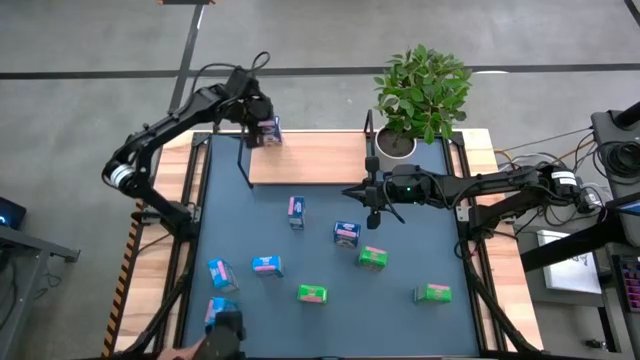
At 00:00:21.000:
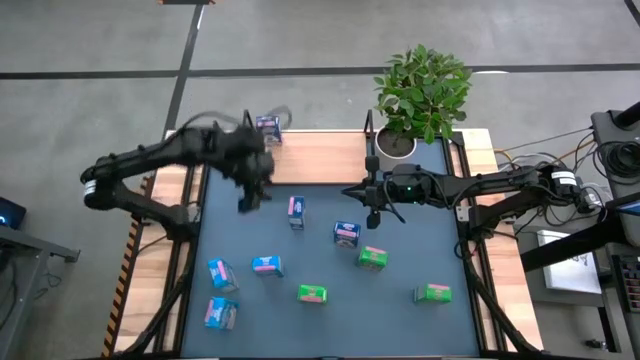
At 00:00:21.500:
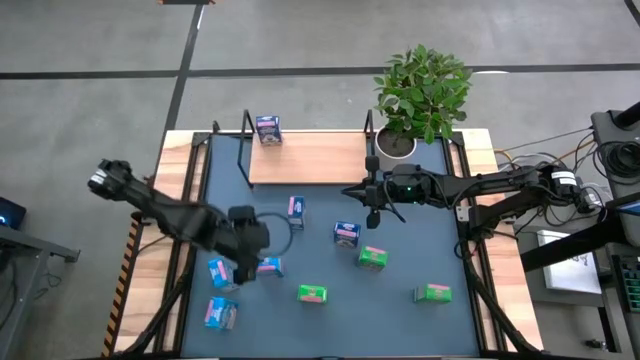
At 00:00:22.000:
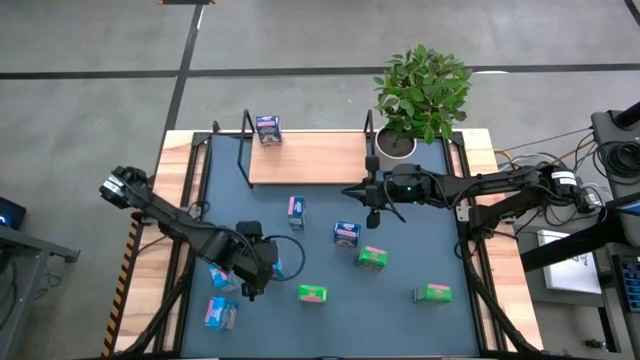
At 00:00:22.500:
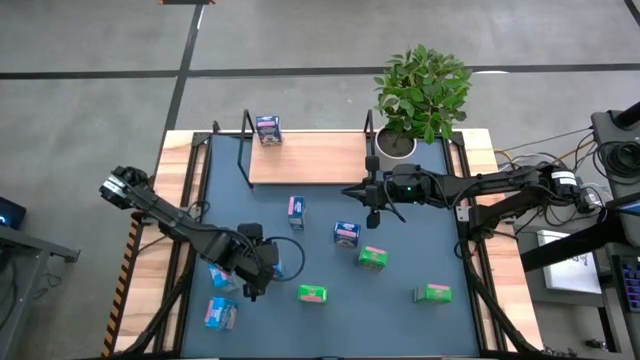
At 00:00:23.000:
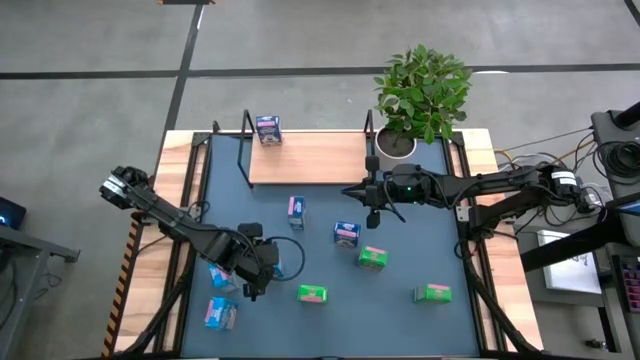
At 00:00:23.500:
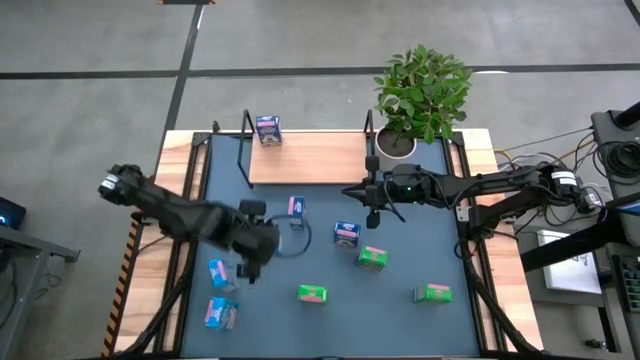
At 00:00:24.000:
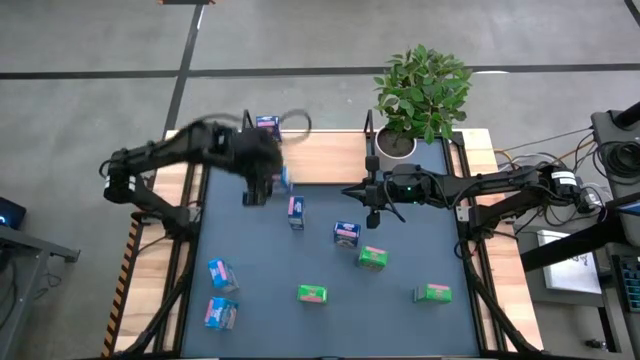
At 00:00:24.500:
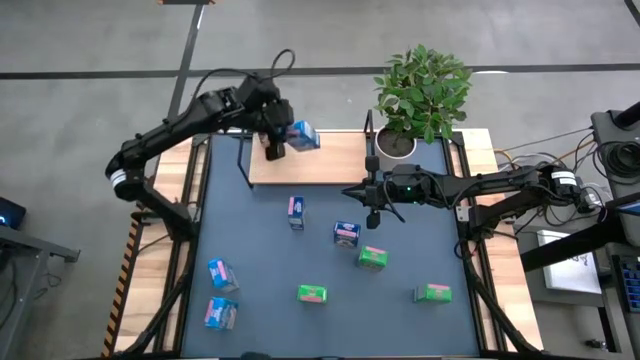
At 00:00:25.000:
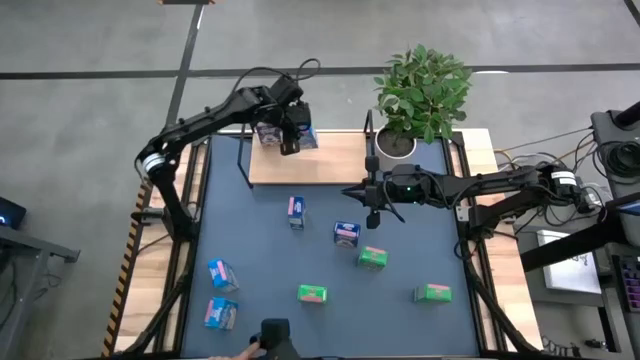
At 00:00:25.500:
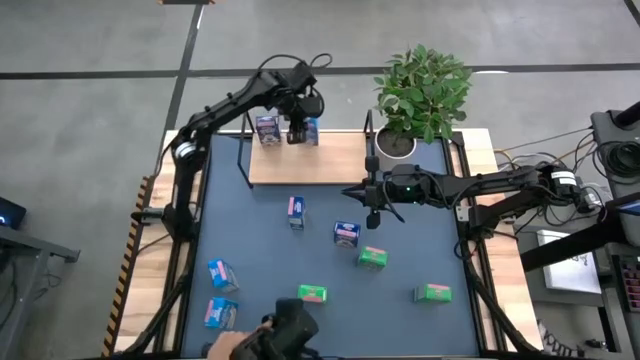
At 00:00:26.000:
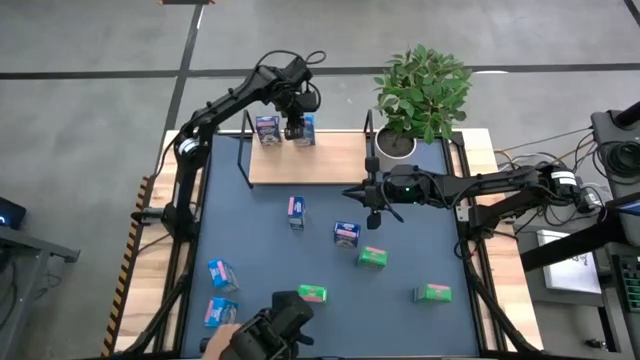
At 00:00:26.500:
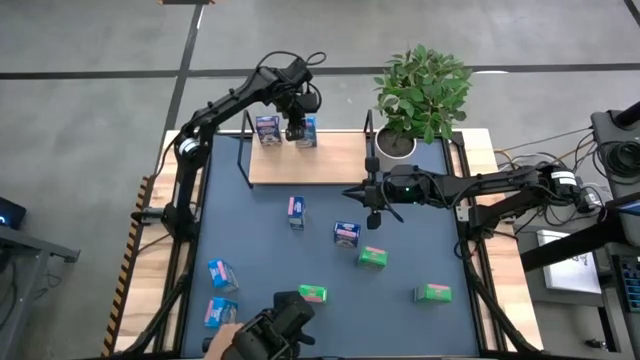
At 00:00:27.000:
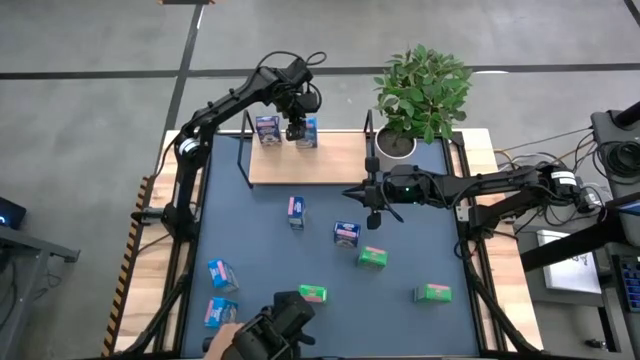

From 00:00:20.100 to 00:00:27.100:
Task: Stack cereal on shelf
Put the top right light blue cereal box on the shelf

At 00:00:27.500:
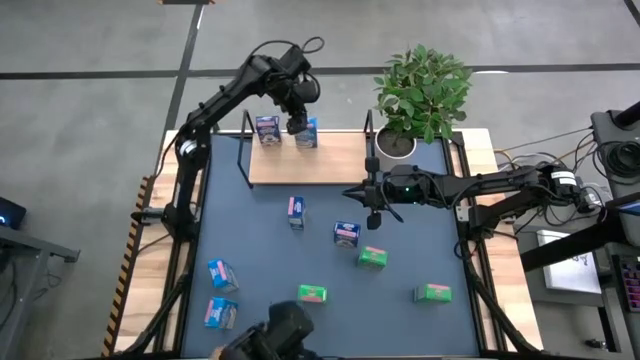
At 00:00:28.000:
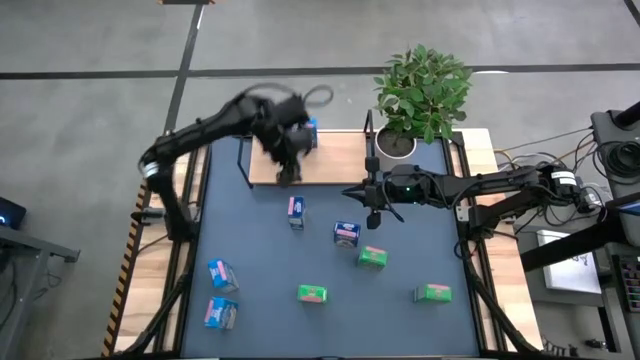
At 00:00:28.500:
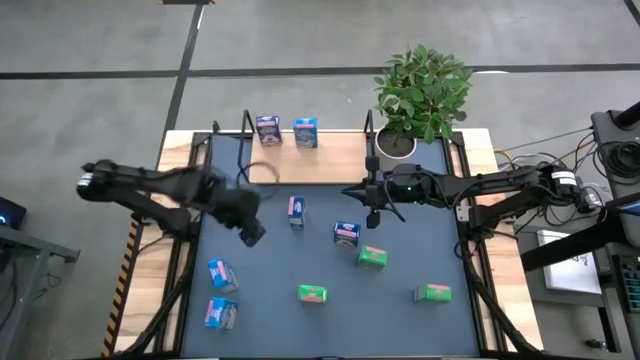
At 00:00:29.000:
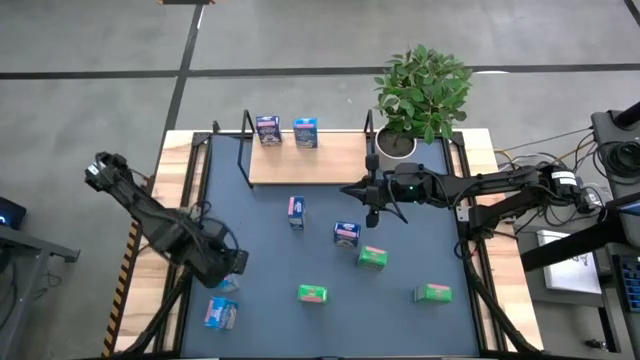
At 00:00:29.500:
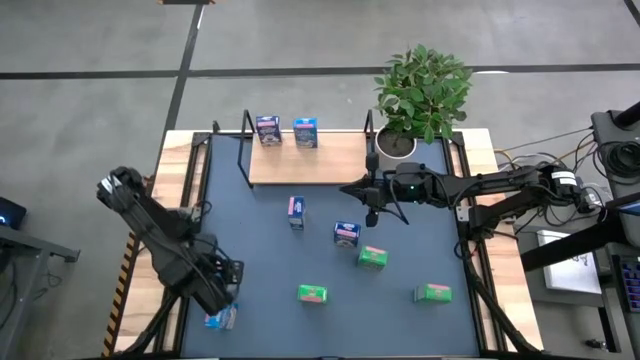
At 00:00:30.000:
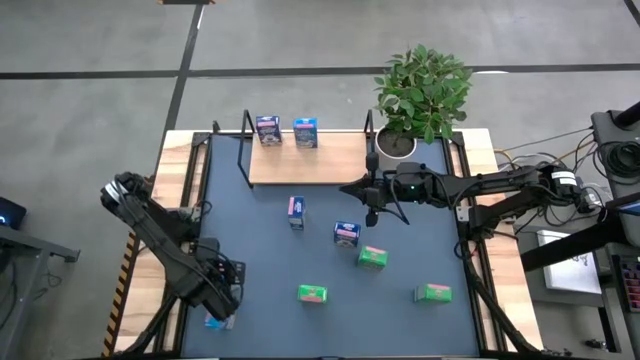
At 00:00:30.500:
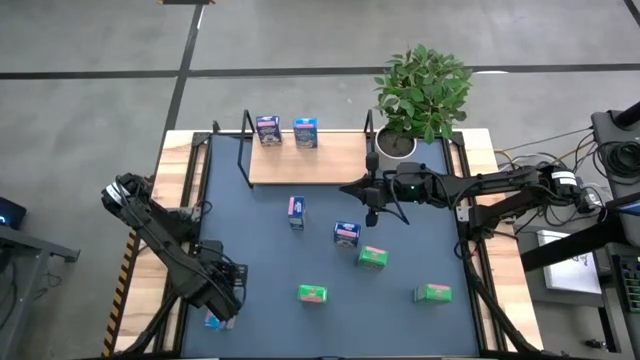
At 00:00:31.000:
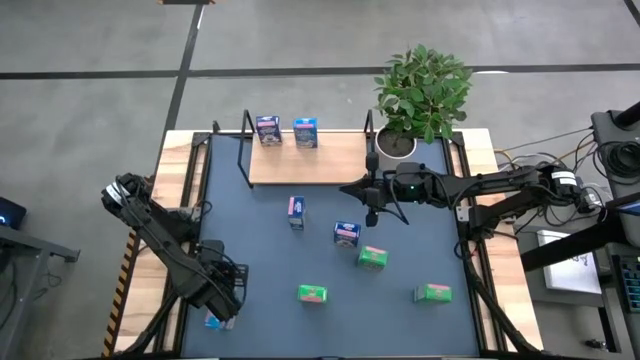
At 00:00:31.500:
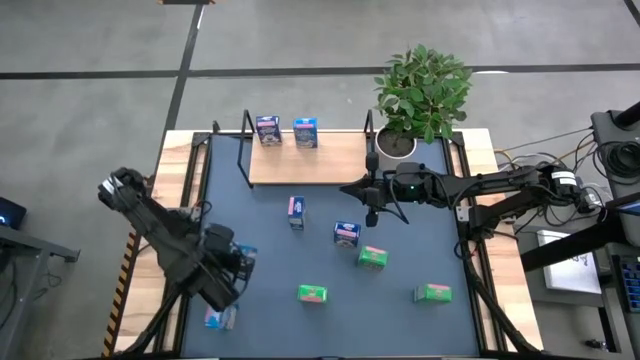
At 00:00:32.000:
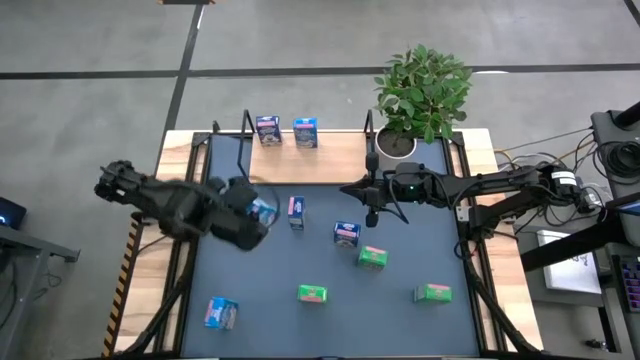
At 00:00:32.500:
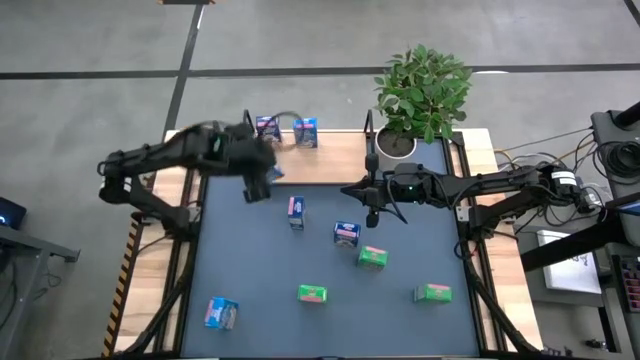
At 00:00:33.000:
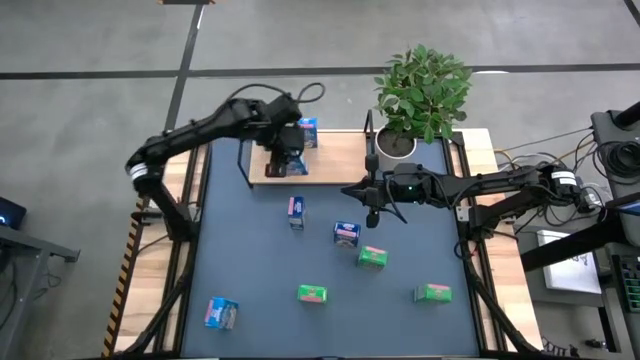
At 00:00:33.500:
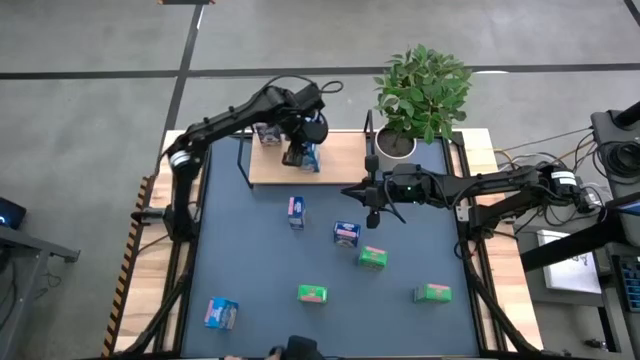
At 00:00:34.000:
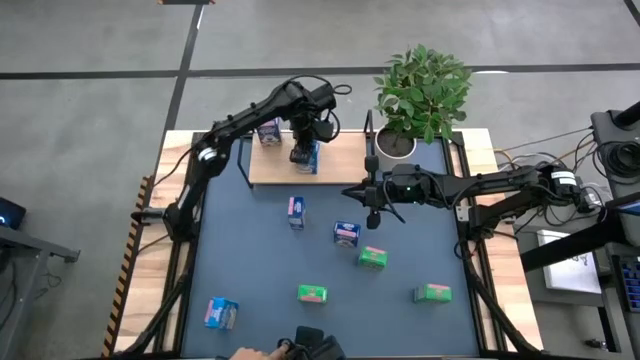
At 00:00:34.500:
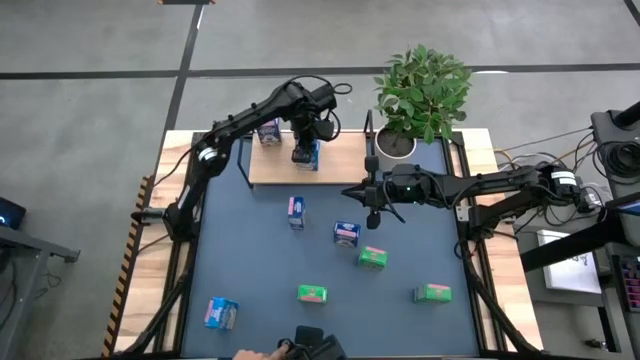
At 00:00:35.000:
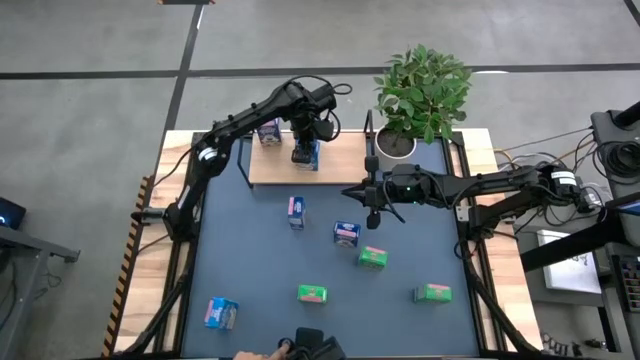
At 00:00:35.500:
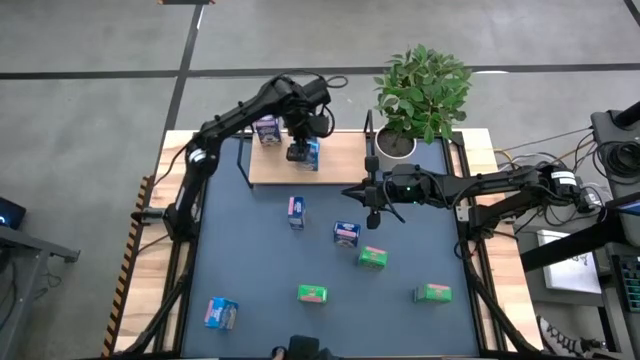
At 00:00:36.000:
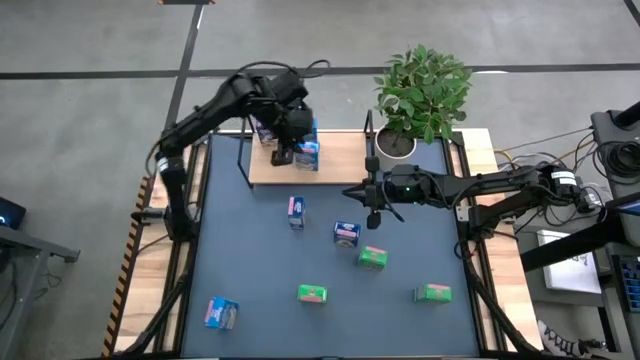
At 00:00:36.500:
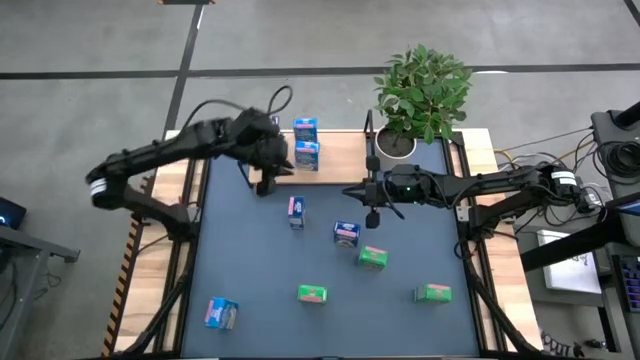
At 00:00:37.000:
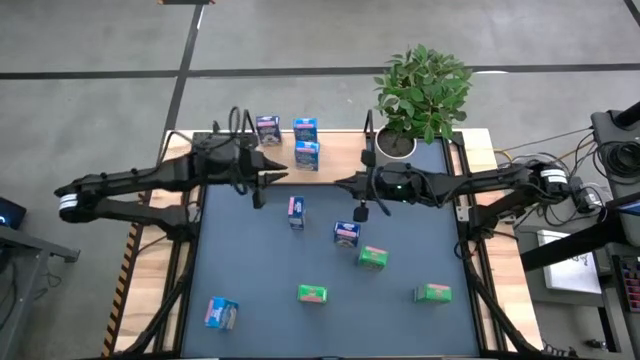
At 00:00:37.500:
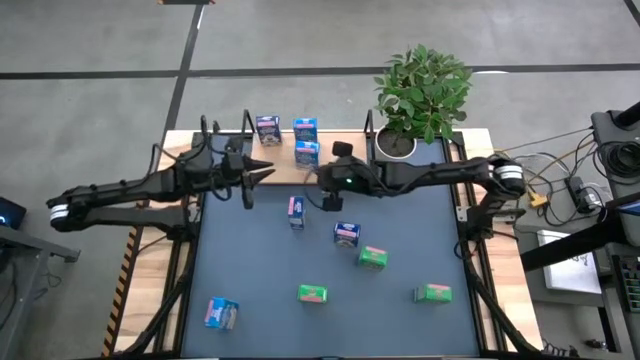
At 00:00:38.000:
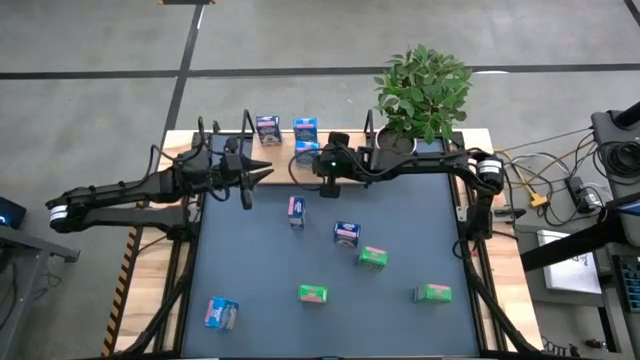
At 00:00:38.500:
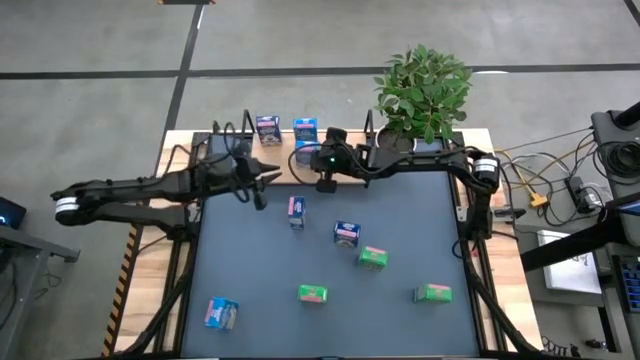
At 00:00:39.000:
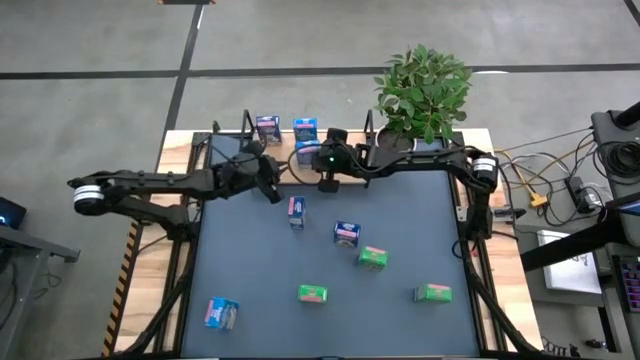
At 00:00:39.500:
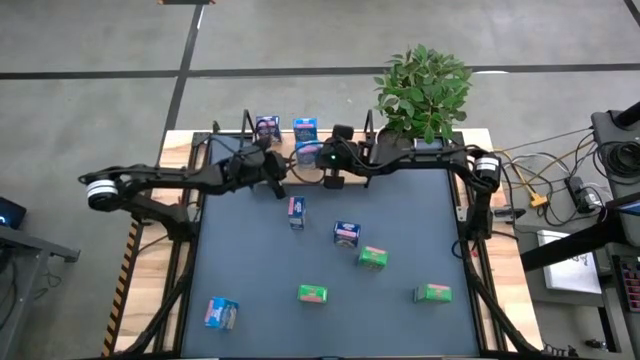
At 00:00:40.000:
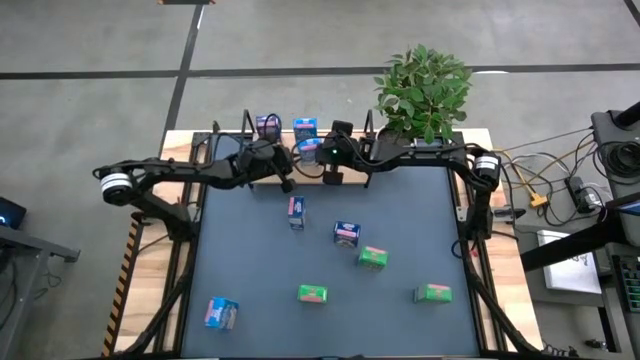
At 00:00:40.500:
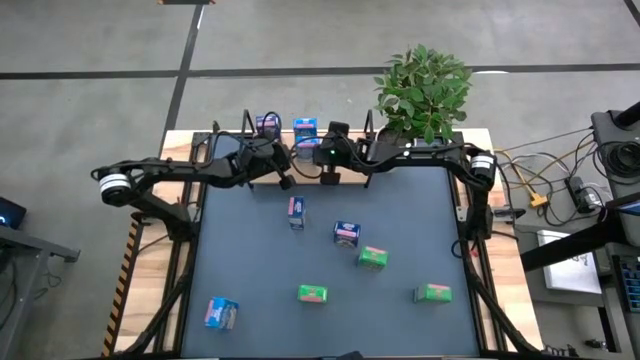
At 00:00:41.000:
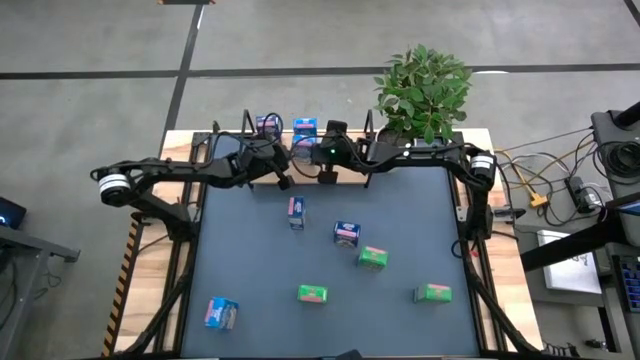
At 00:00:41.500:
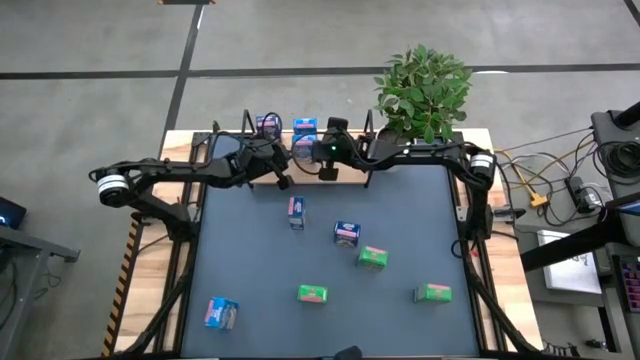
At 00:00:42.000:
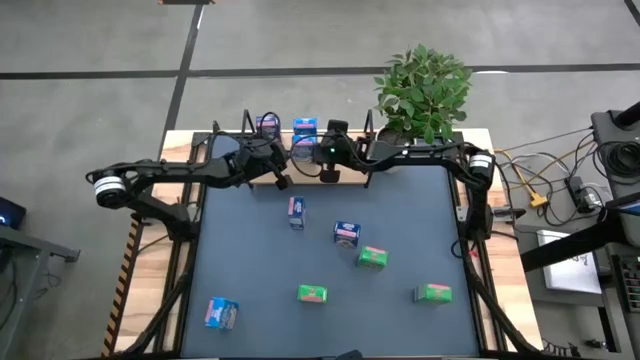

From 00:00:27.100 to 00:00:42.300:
Put the top light blue cereal box on the shelf aligned with the other light blue cereal box
